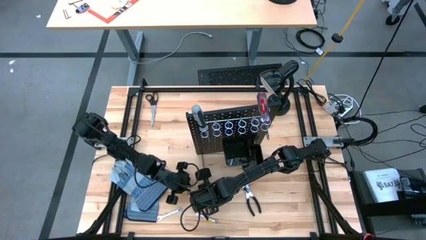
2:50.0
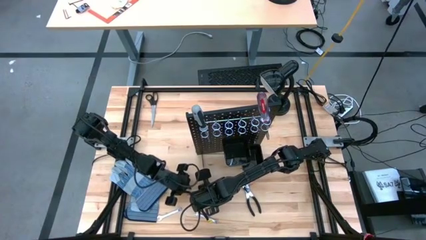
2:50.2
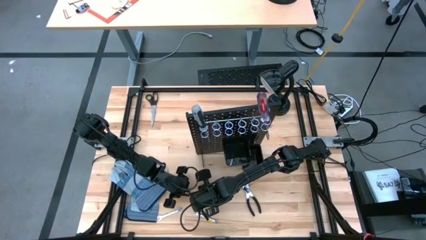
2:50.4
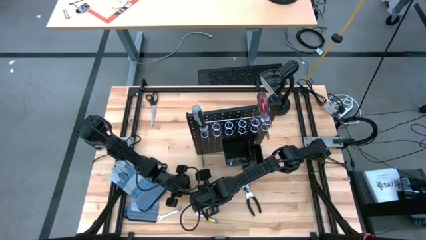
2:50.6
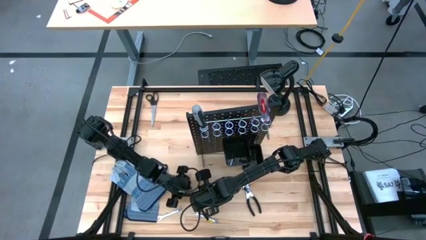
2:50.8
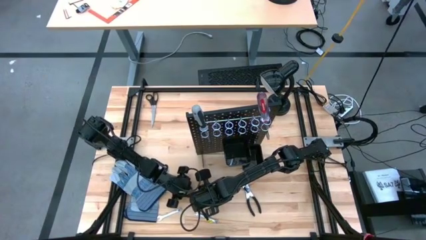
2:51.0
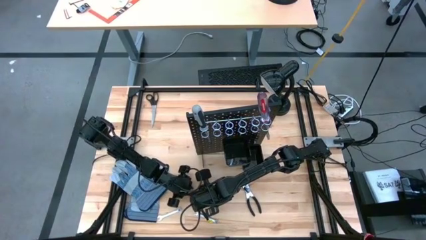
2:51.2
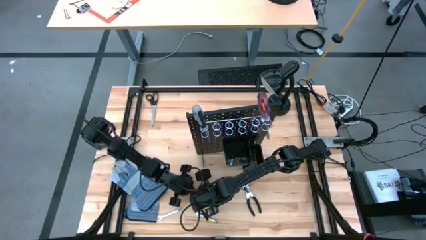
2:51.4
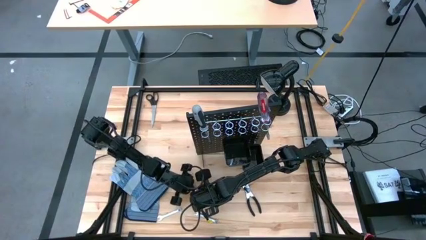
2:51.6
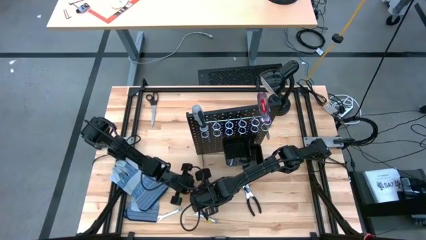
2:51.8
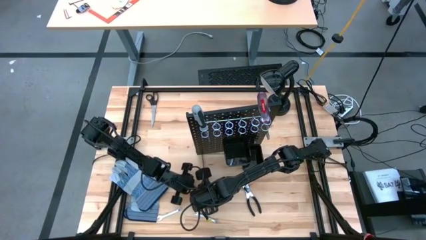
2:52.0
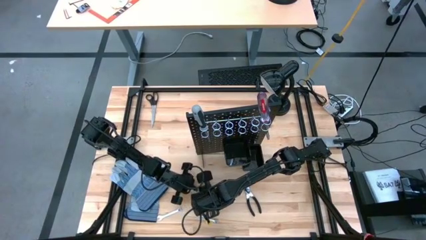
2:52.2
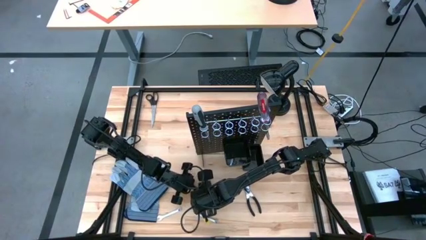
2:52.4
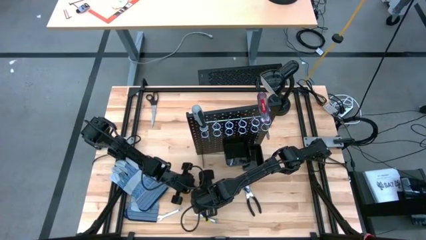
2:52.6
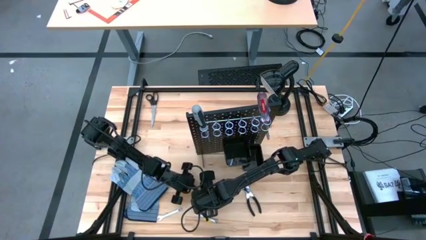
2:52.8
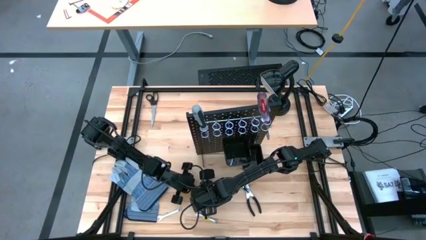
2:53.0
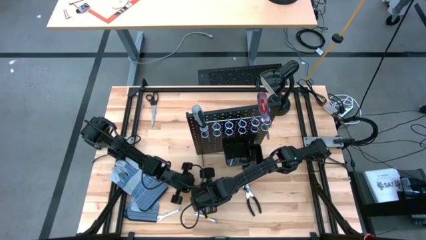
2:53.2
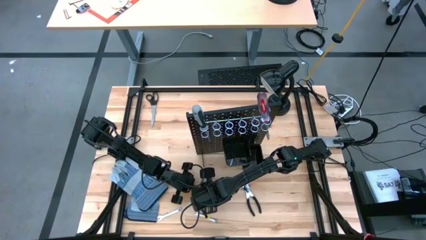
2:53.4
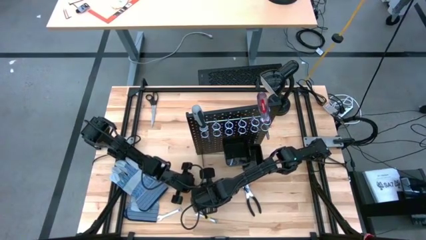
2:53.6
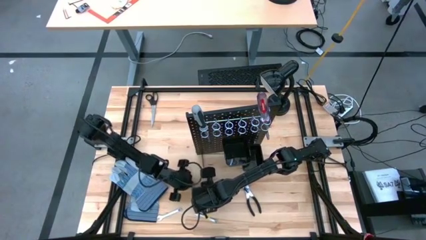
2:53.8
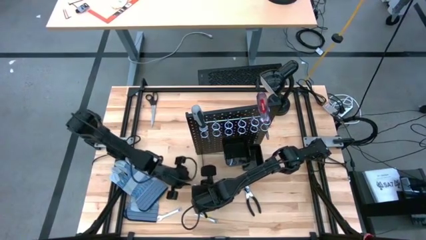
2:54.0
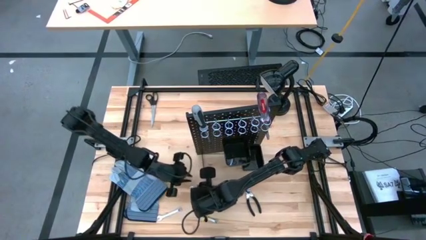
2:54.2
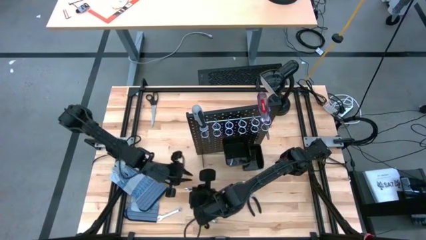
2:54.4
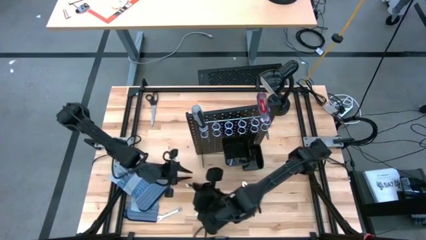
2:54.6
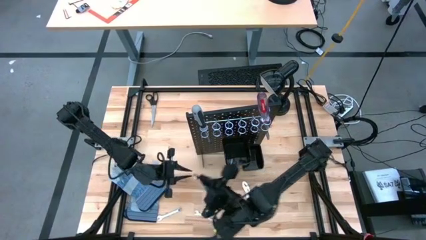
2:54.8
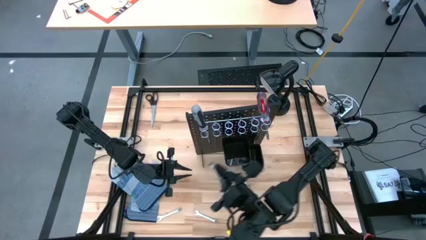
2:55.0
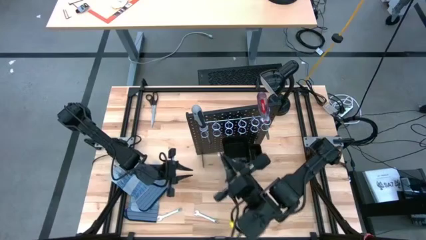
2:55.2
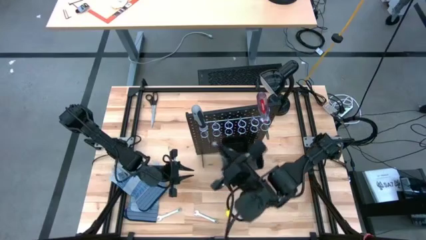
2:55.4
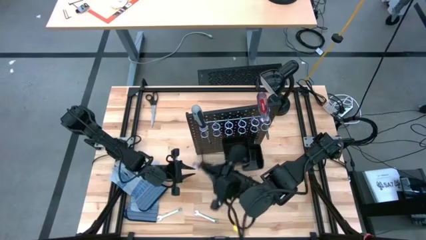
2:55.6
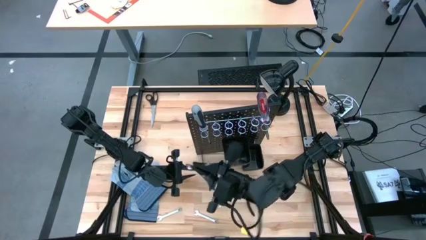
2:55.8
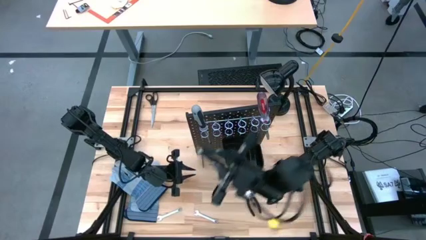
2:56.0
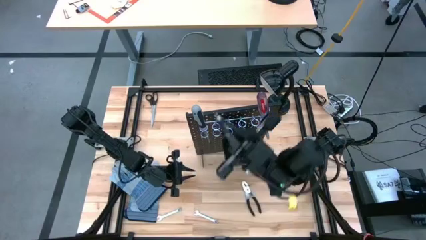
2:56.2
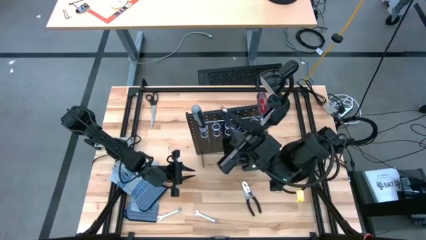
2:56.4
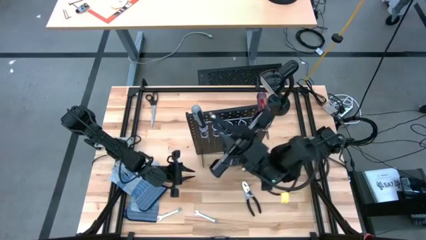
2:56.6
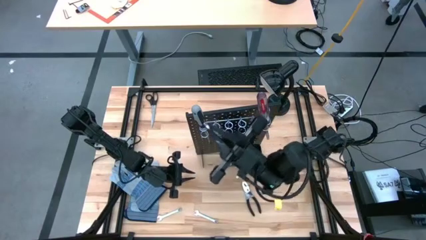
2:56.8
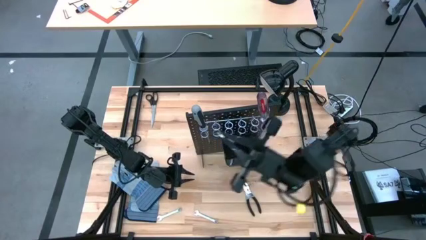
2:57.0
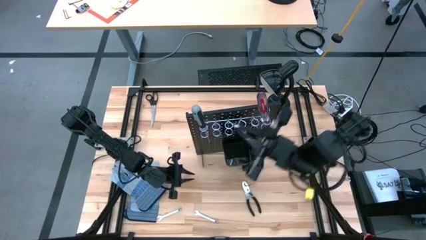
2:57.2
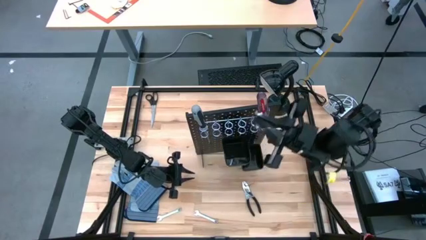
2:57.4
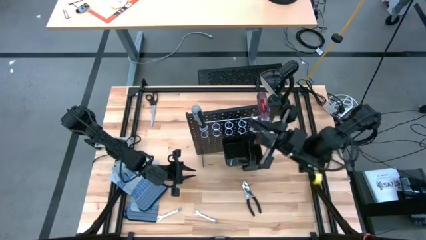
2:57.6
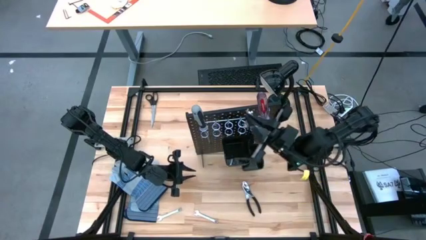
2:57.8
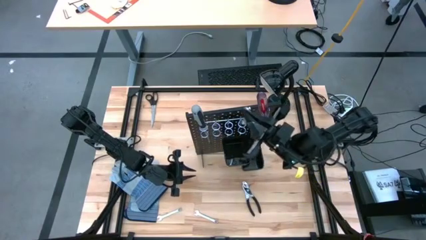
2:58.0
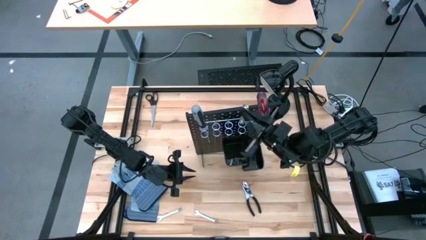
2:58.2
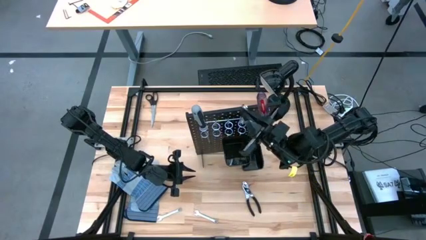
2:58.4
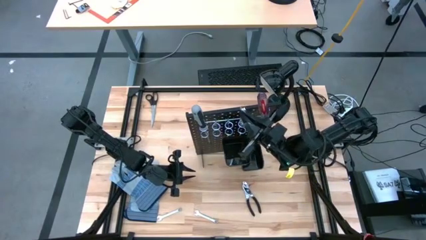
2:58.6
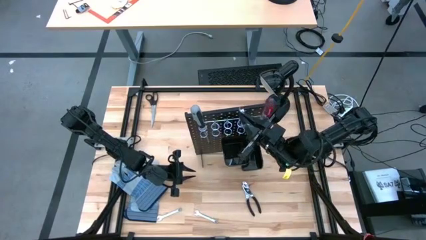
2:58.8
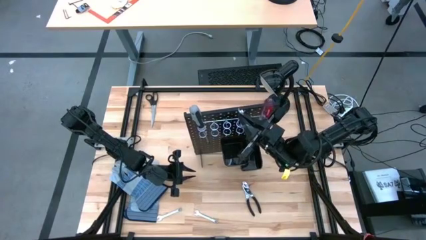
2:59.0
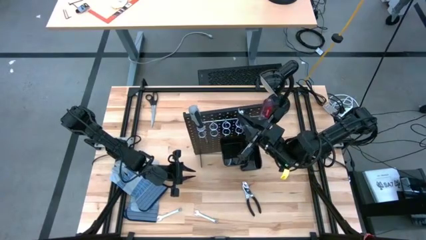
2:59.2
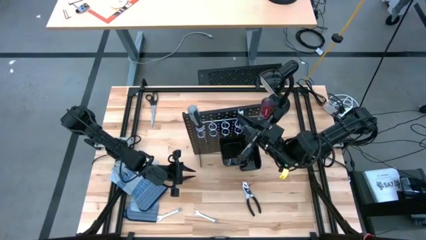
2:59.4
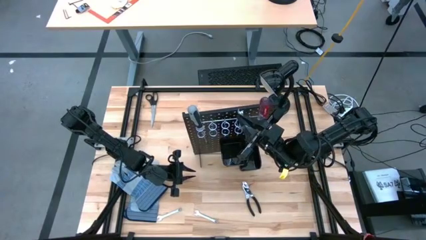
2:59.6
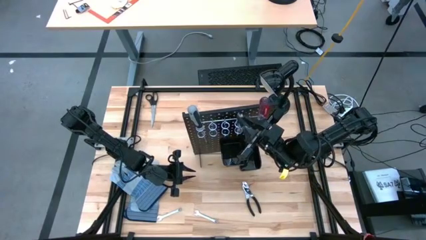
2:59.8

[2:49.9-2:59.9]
Task: Hang tools onto peg board
Hang the silver wrench on the black peg board
